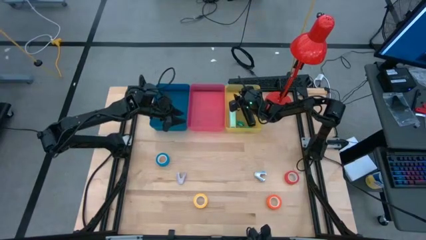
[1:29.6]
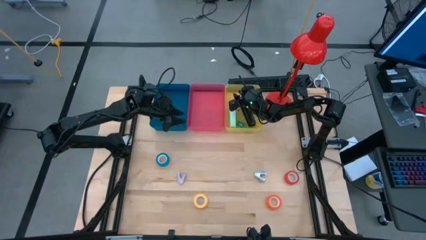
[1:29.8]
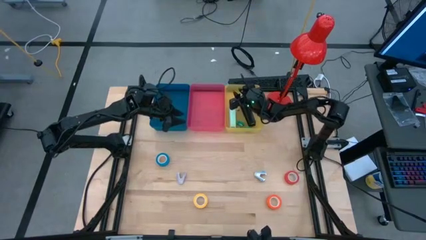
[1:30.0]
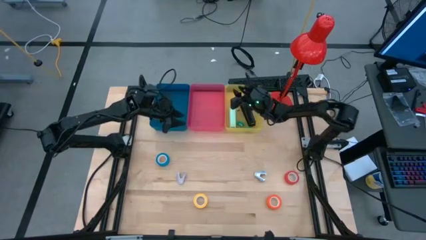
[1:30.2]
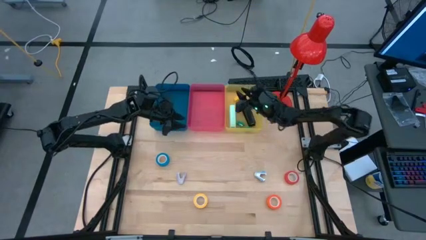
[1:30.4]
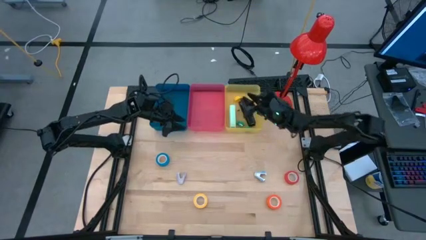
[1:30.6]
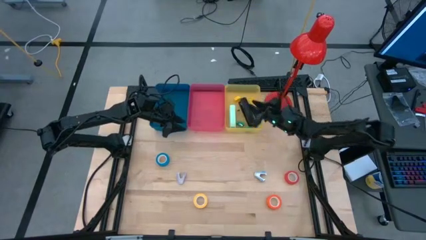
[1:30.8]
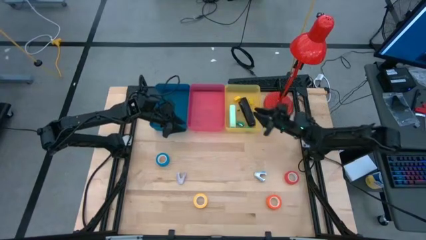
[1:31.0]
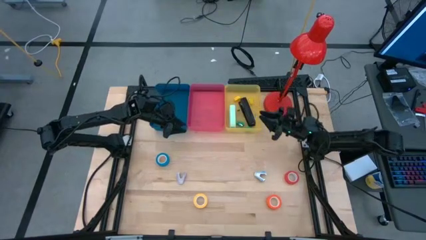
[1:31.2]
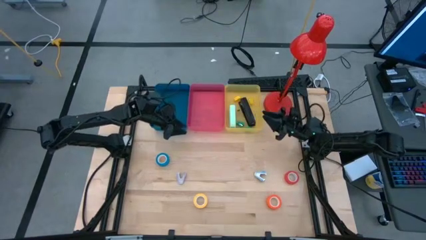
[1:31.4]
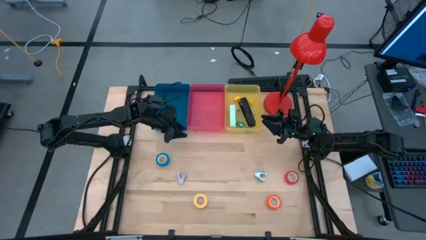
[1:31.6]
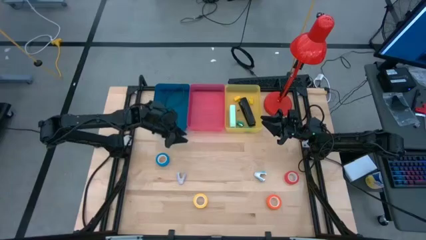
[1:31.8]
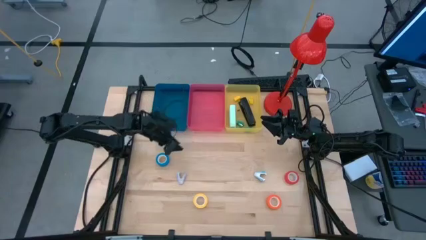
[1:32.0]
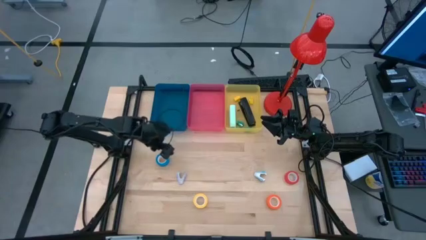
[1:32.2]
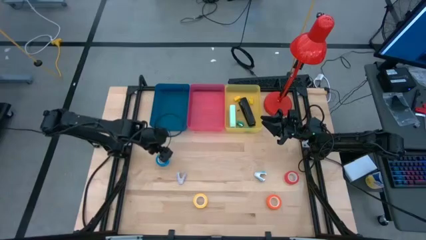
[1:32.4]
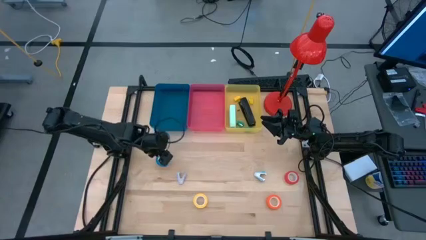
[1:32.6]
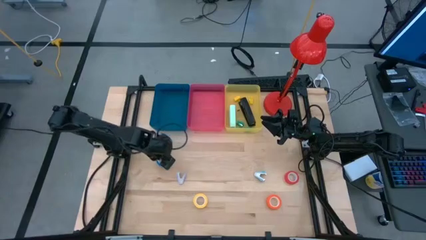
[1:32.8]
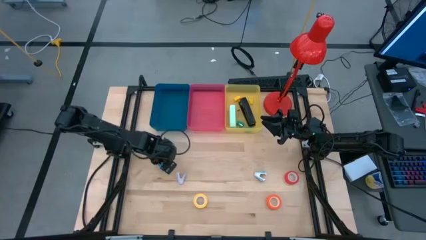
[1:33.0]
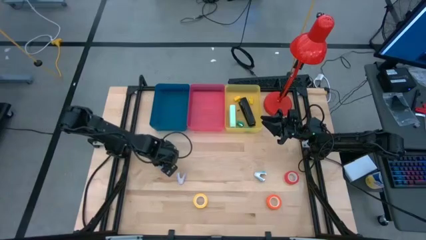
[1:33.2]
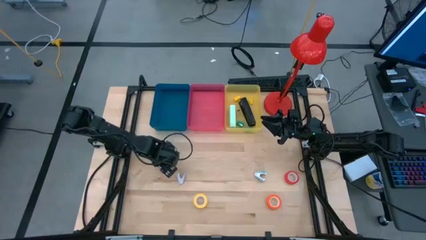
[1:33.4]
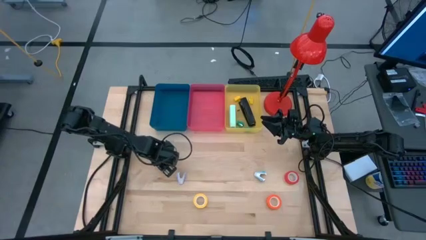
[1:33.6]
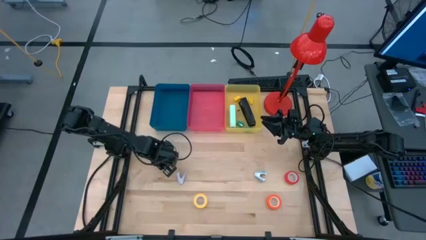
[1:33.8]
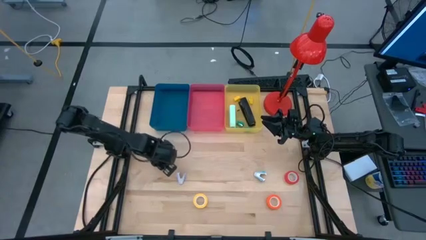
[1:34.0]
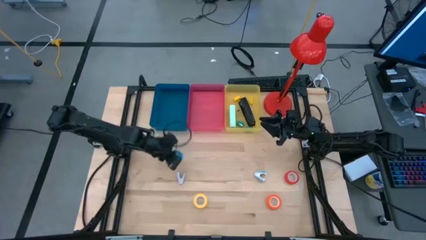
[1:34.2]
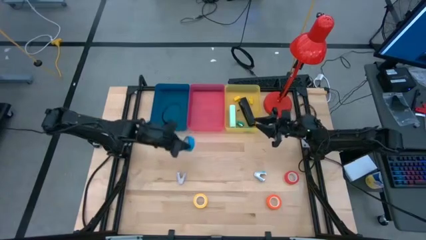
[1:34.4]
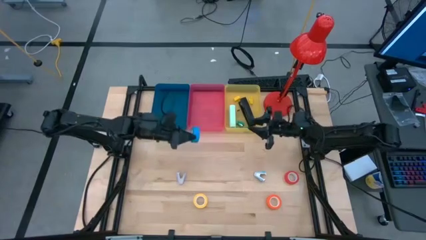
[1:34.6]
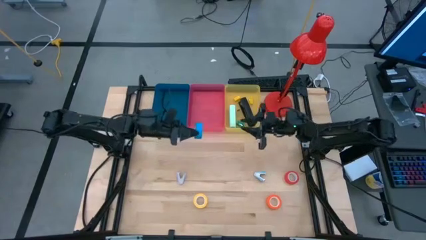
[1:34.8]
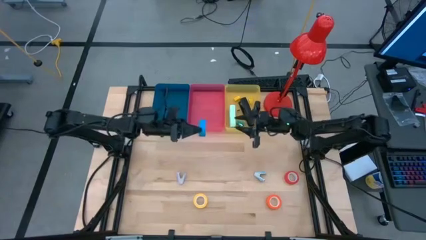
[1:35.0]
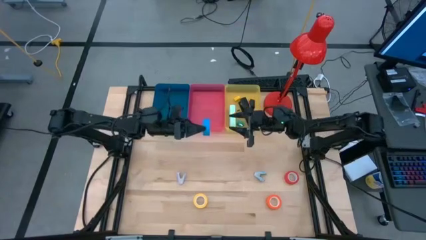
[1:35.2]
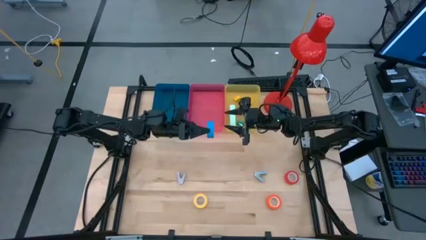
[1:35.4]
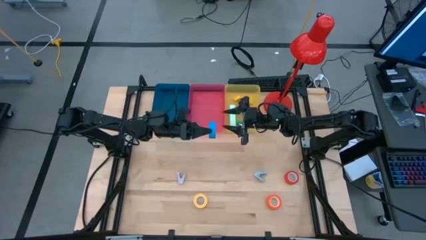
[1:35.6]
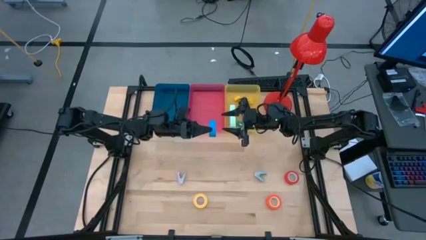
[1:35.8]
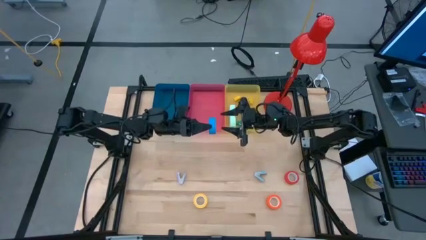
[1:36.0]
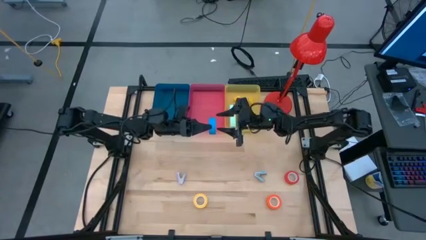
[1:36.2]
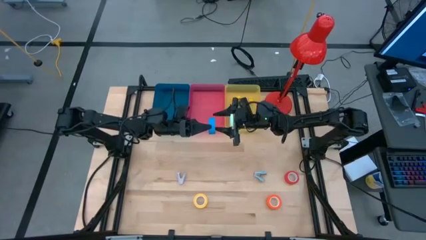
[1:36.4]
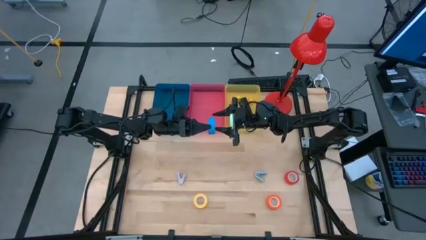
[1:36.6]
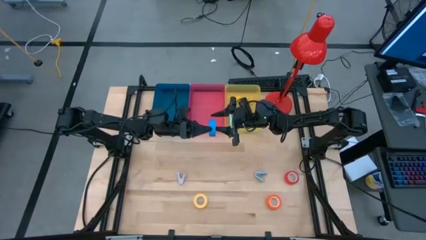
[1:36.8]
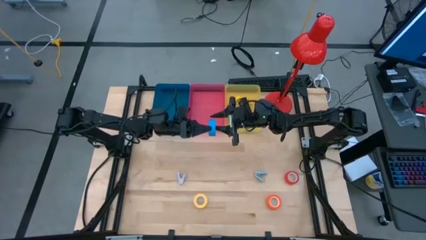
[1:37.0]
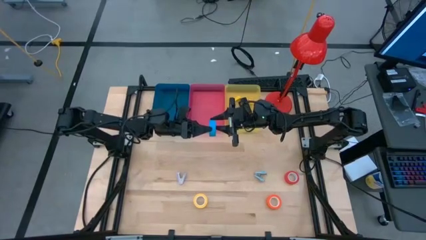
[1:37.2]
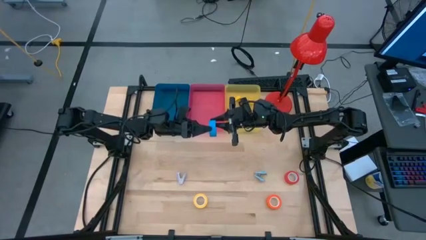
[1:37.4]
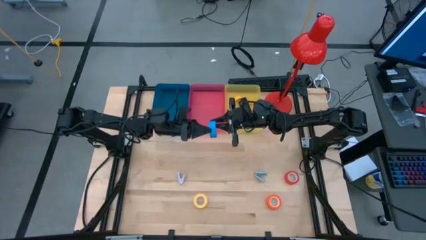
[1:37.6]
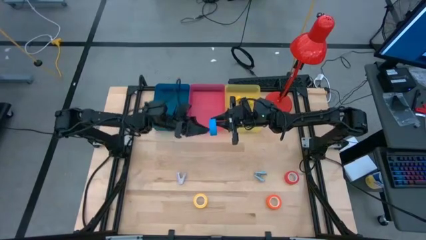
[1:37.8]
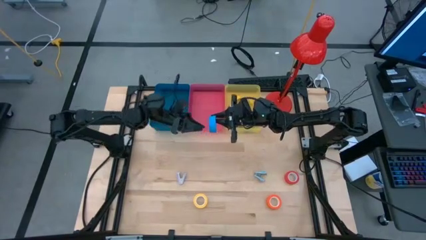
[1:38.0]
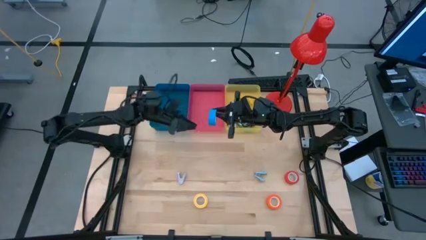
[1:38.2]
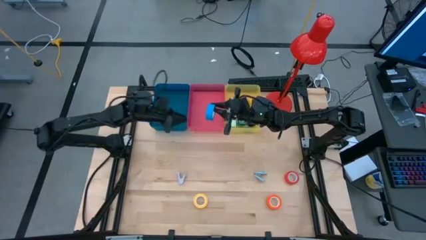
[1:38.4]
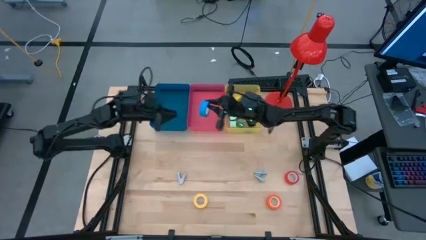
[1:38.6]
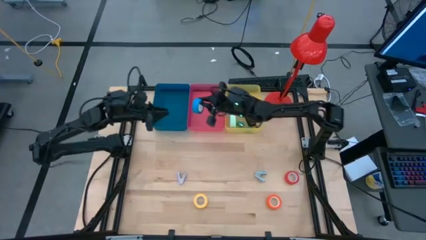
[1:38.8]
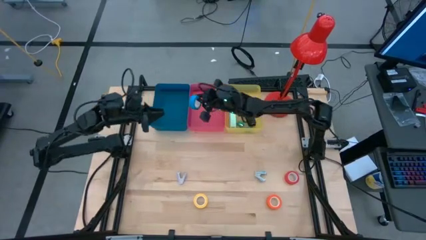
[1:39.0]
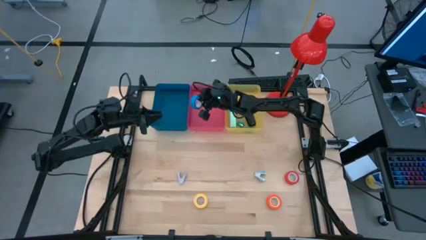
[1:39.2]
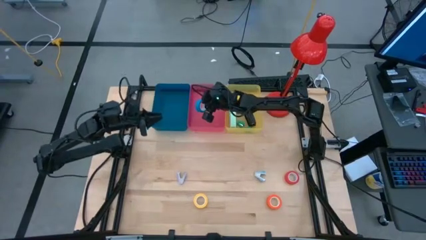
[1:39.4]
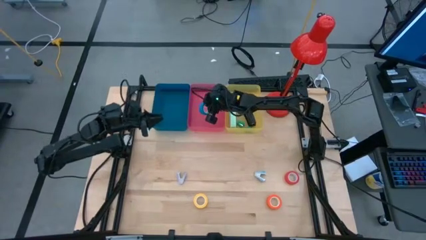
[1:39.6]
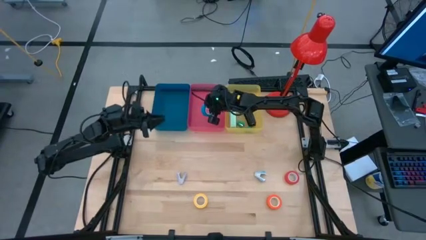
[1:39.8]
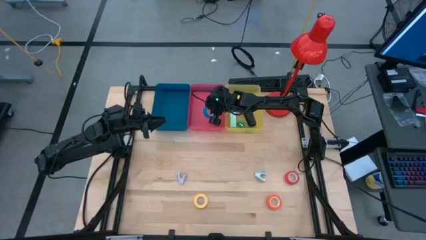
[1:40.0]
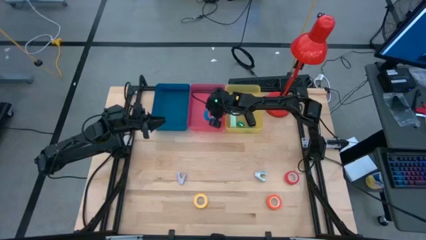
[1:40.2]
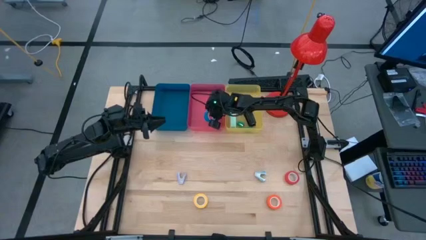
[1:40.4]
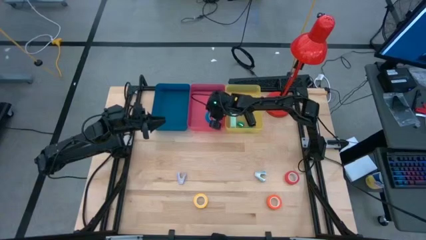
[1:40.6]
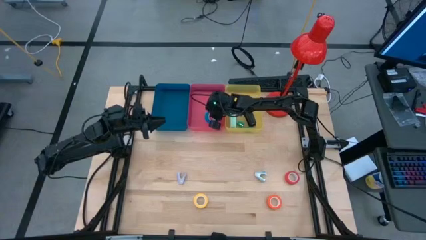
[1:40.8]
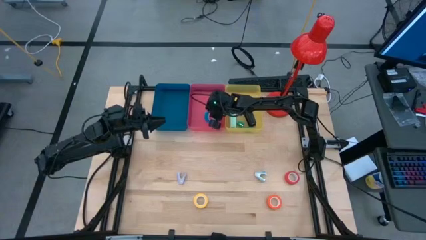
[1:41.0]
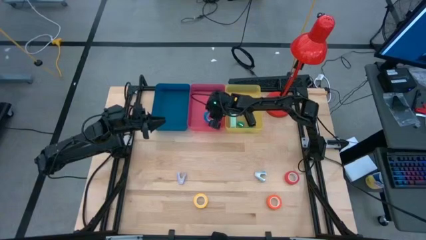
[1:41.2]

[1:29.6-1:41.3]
Task: Pick and place Stapler, Stapler remover, tape
Put the blue tape into the red bin
